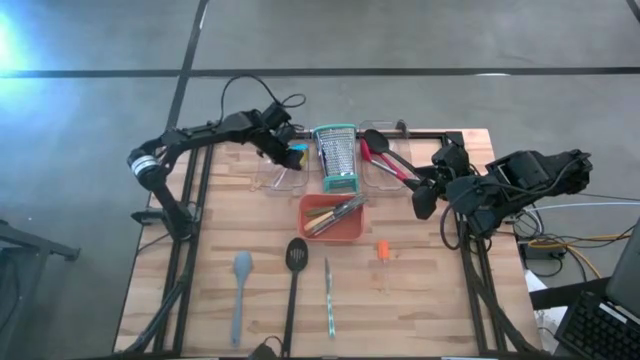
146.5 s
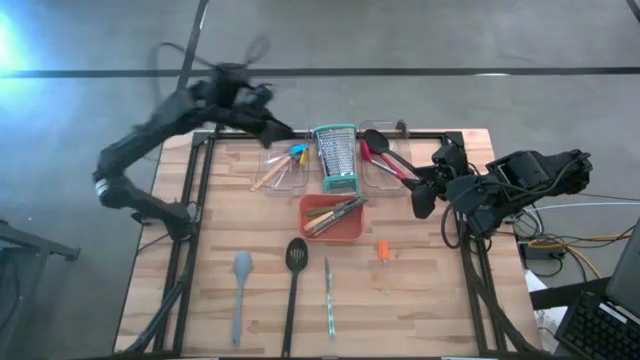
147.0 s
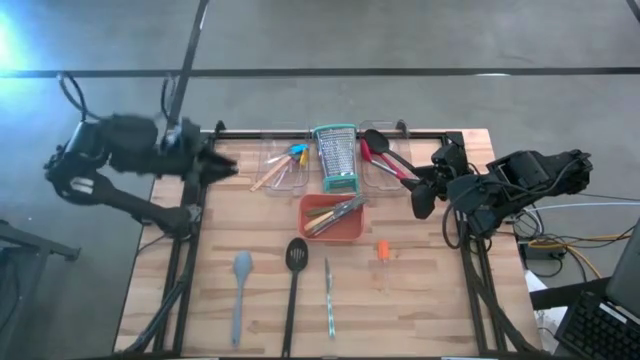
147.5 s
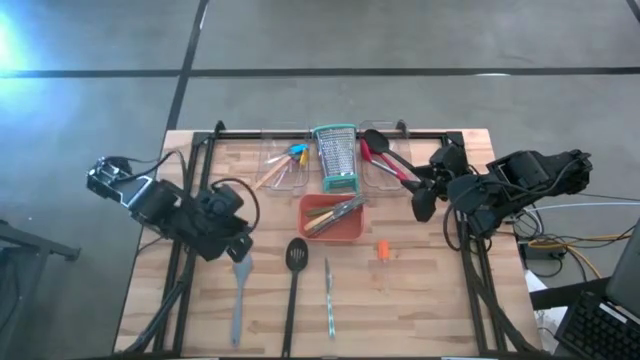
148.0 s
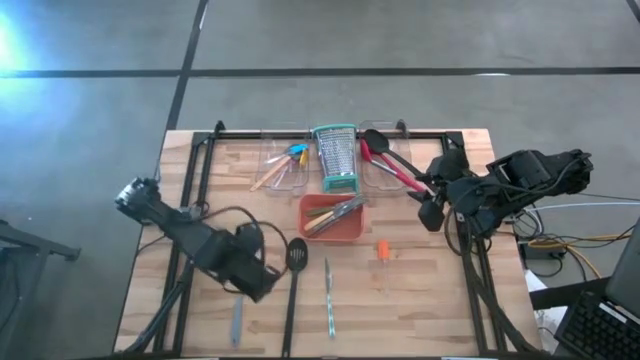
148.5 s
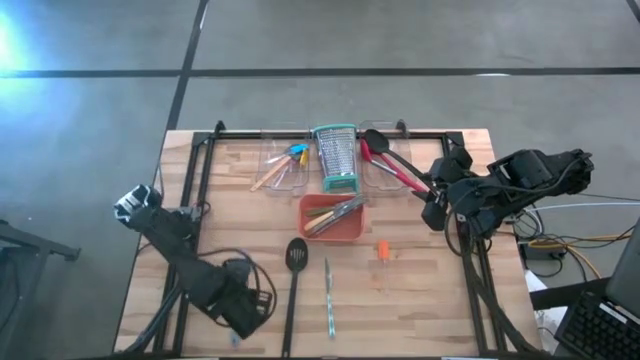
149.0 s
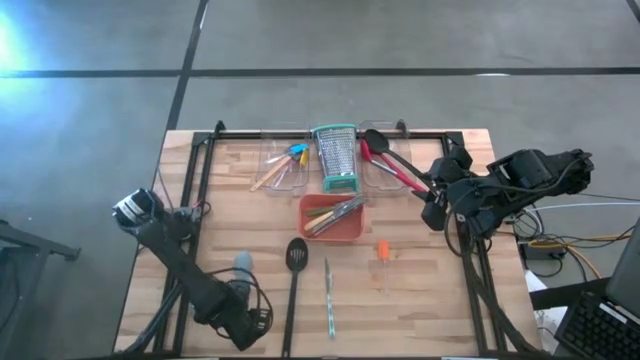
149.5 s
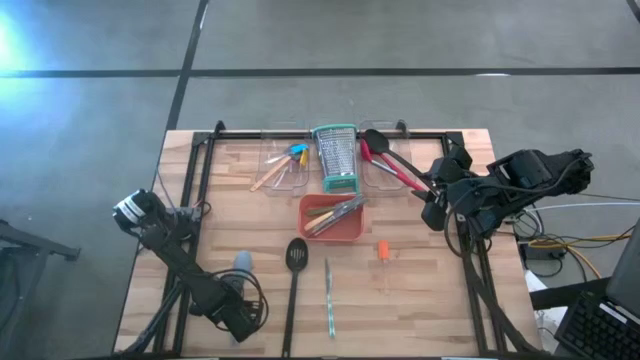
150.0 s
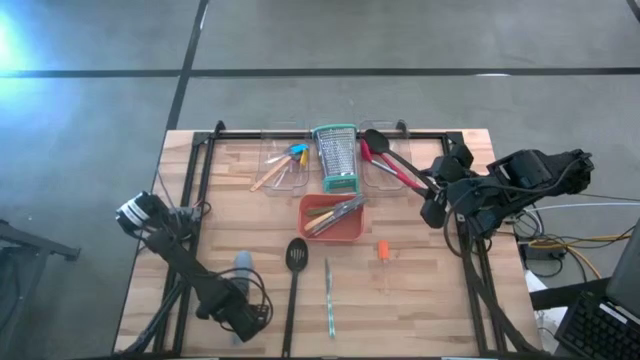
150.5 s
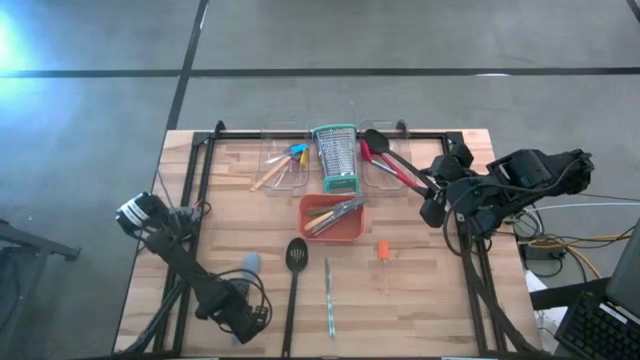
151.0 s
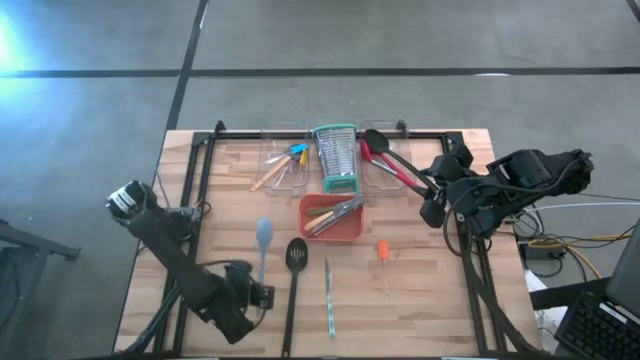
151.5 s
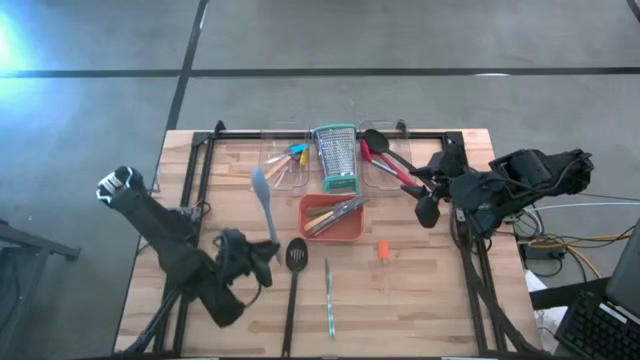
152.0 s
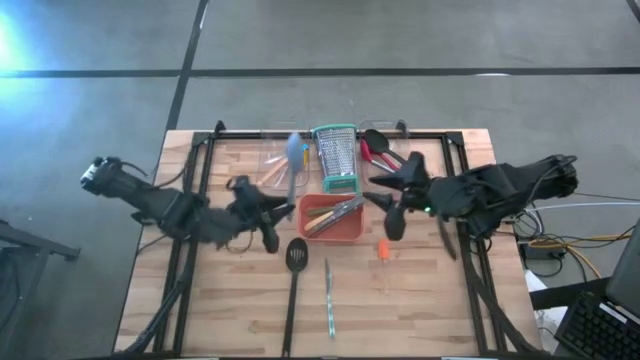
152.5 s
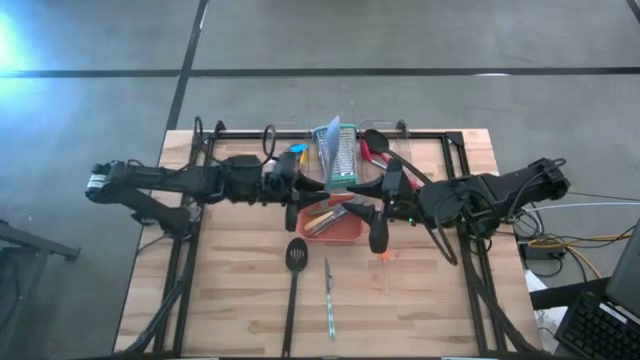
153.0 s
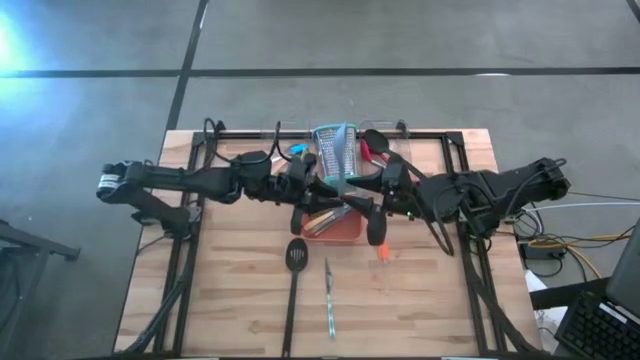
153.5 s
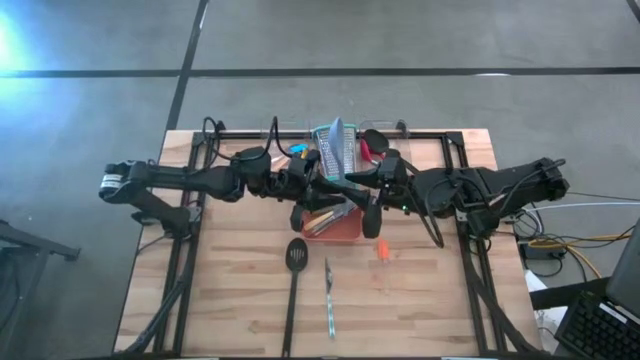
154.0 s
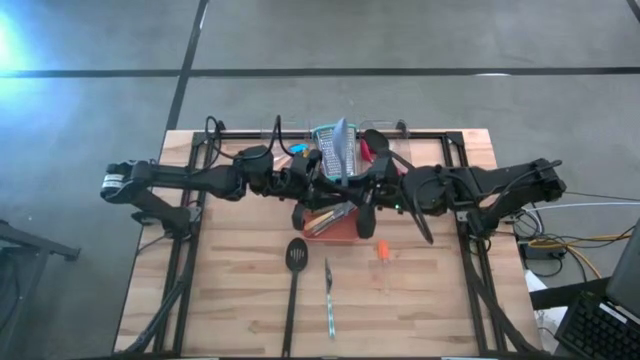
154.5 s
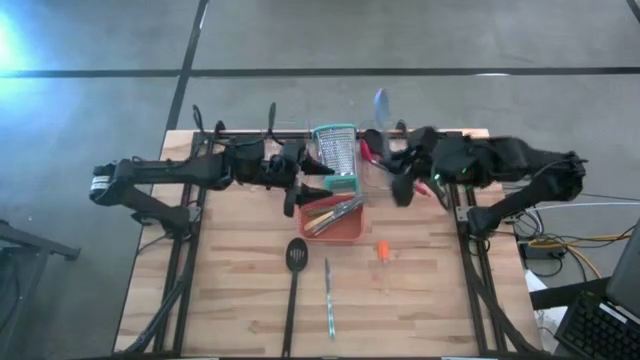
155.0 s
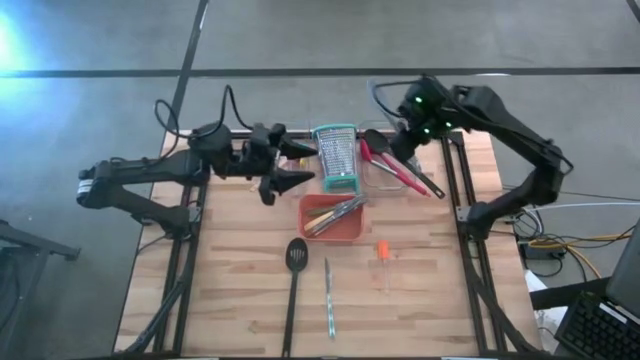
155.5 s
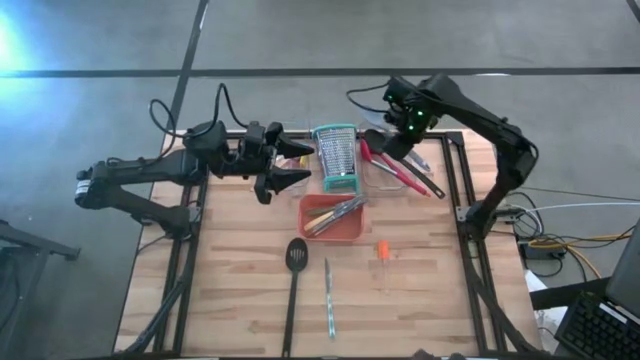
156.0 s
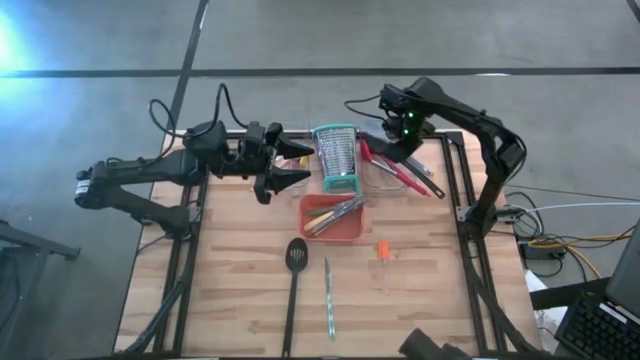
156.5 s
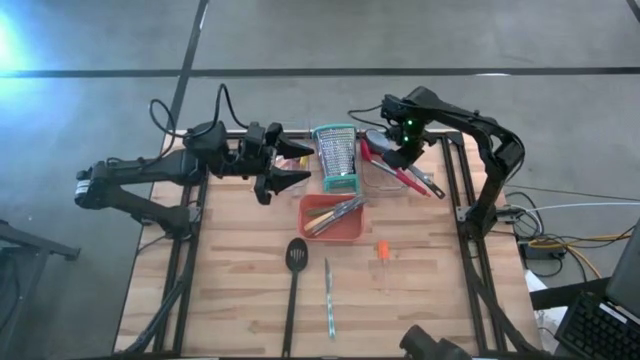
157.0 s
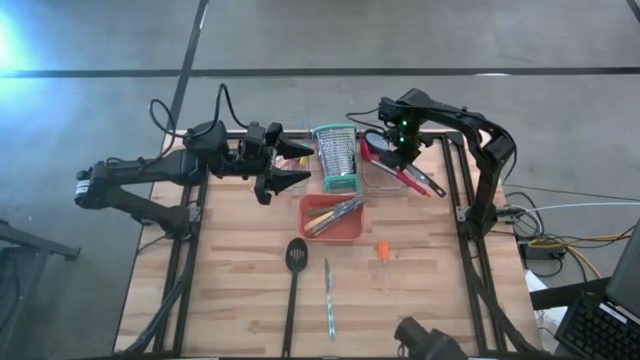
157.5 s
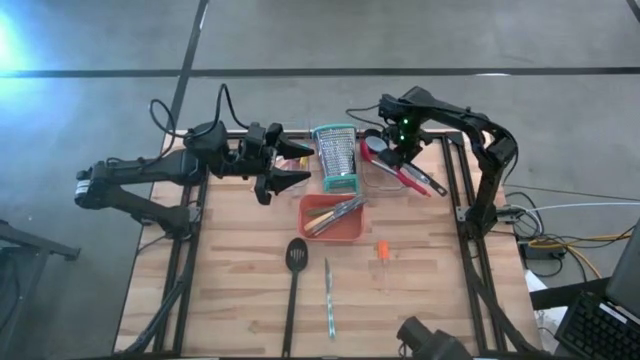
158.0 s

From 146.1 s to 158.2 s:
Task: Pick & Place Kitchen Items
Put the gray serving spoon into the right transparent bin

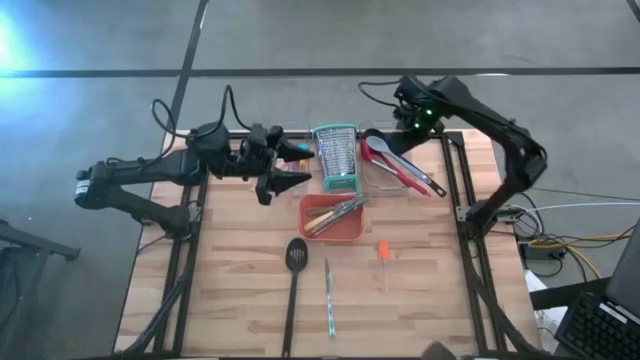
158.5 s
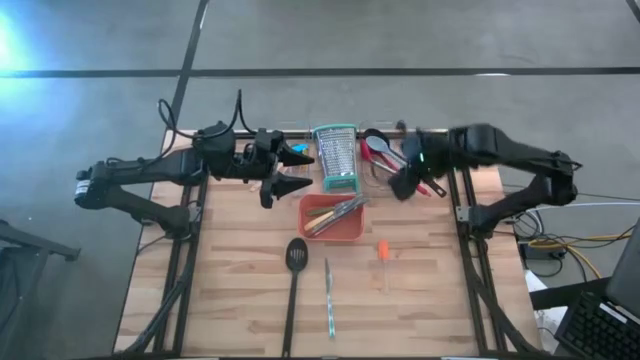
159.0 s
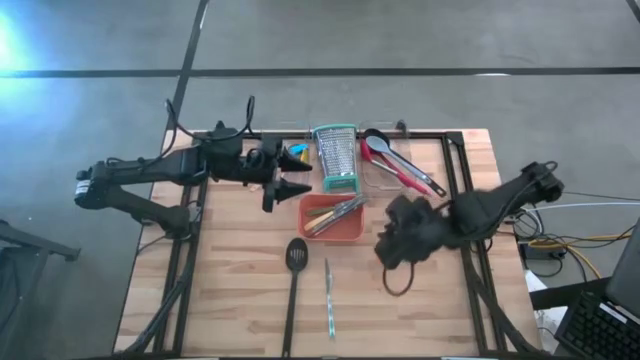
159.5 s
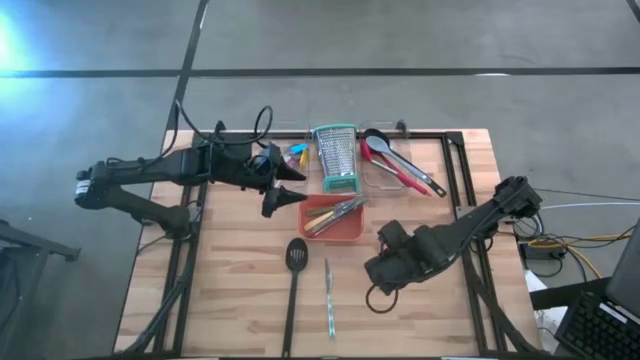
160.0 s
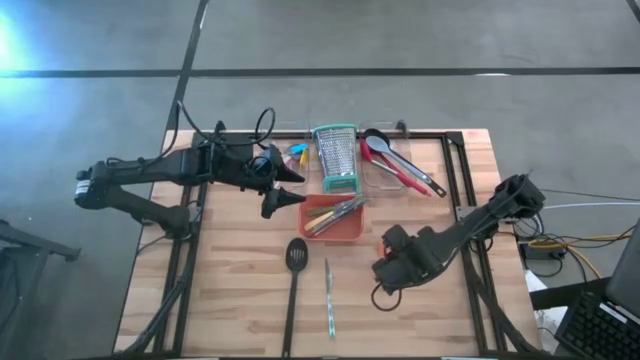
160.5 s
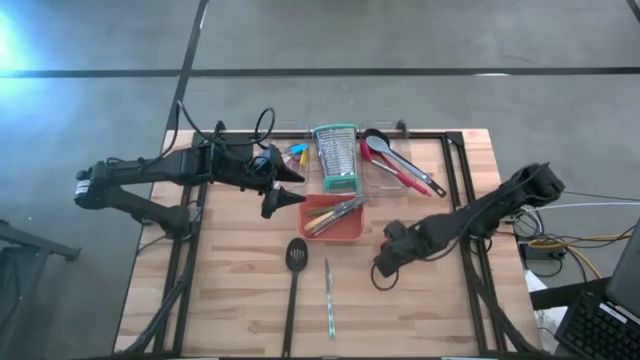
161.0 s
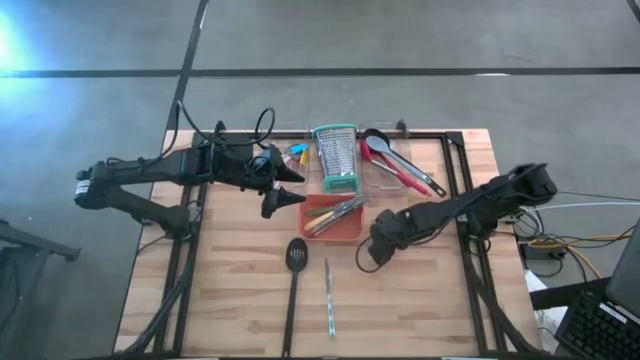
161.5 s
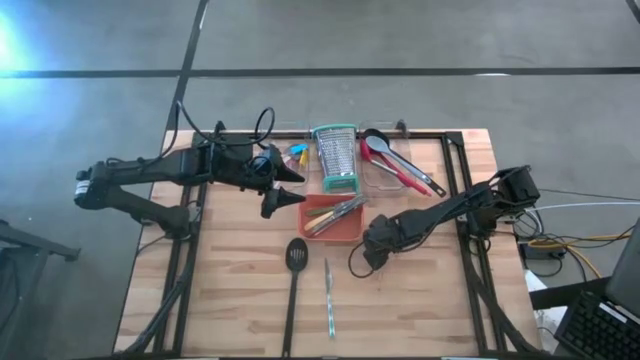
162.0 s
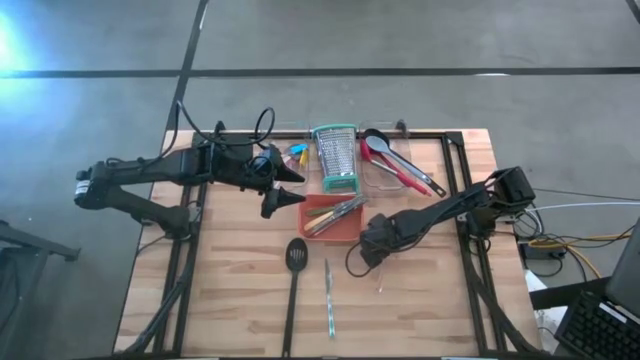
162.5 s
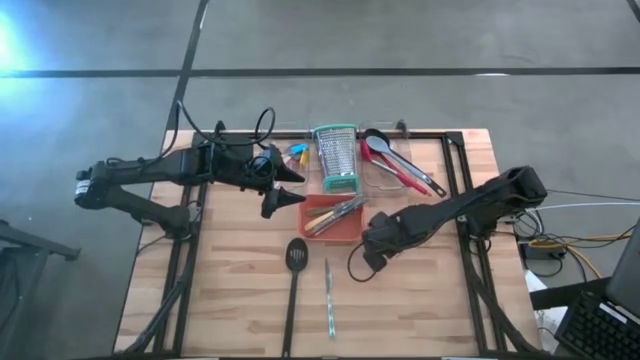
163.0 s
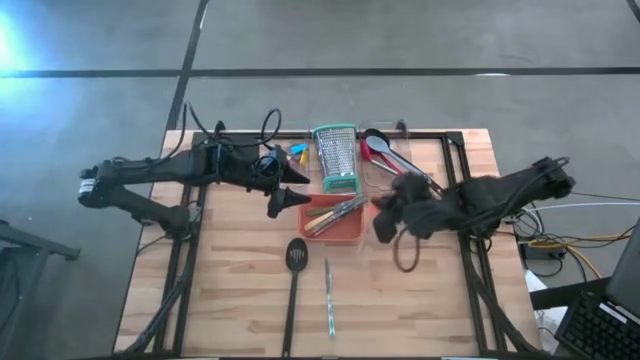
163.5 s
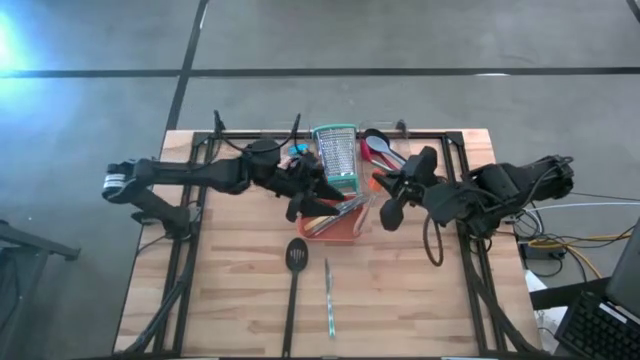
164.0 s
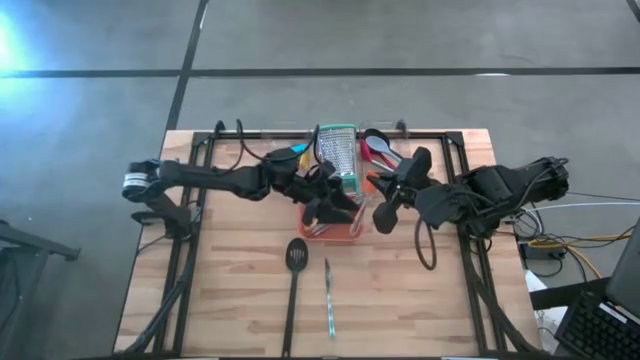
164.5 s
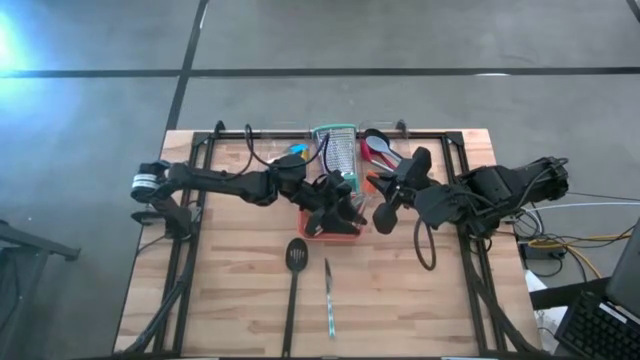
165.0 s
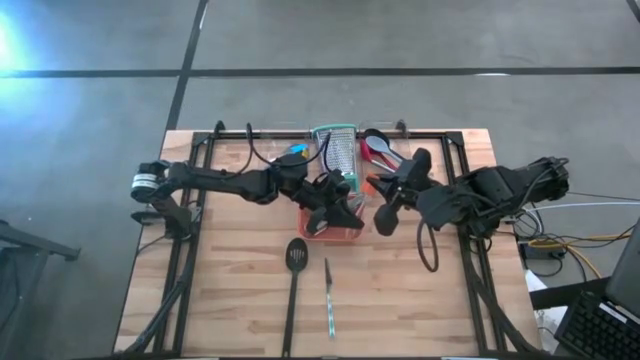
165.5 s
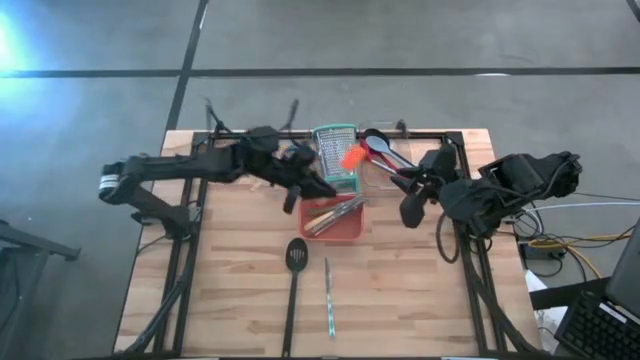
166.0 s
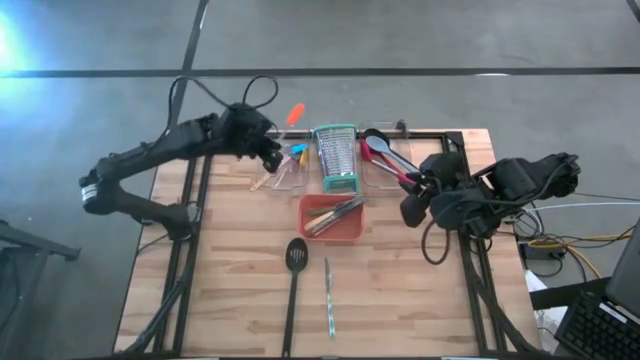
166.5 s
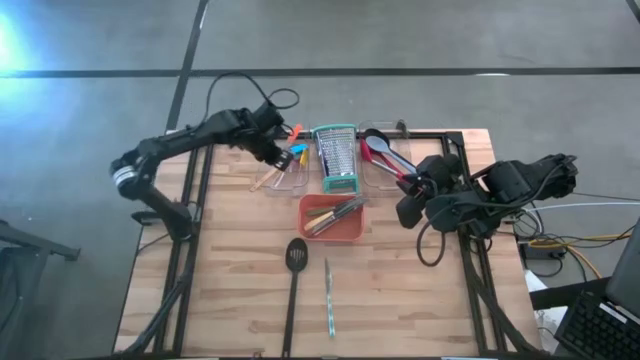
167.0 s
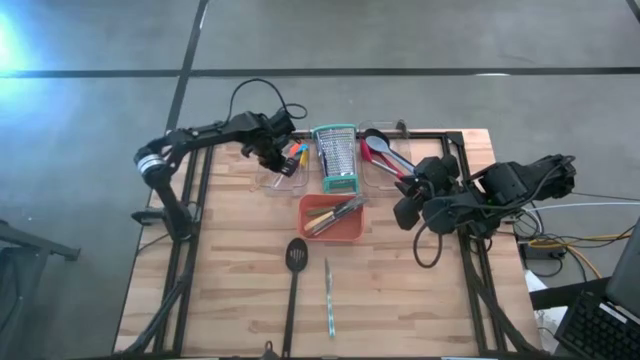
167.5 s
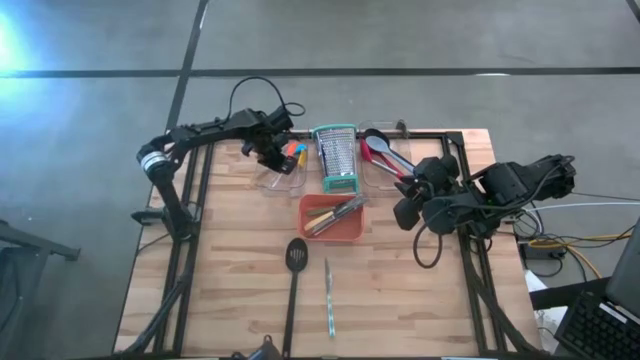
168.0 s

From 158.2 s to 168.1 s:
Put the orange spatula into the left transparent bin
